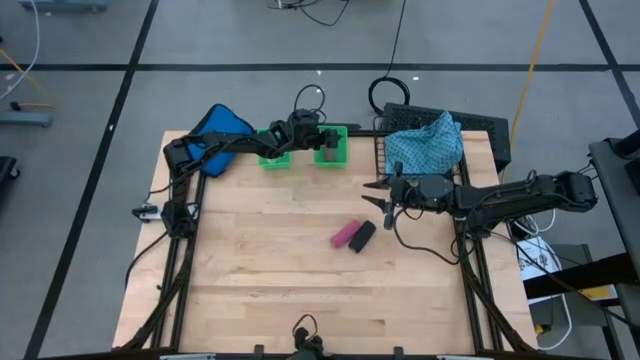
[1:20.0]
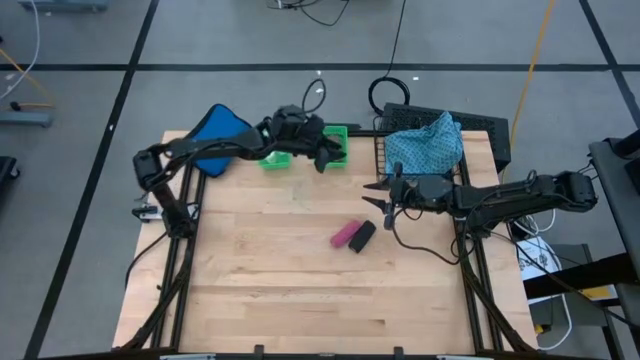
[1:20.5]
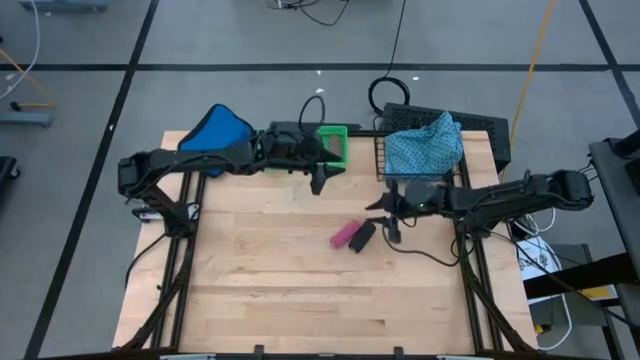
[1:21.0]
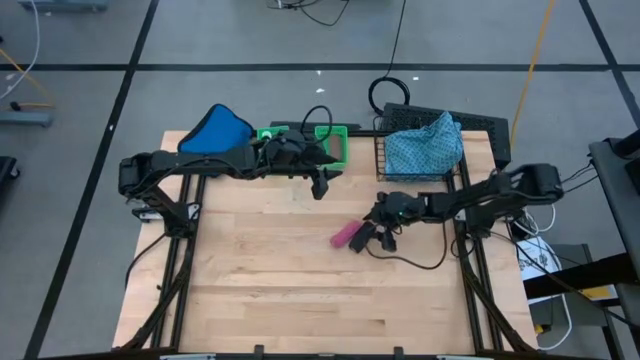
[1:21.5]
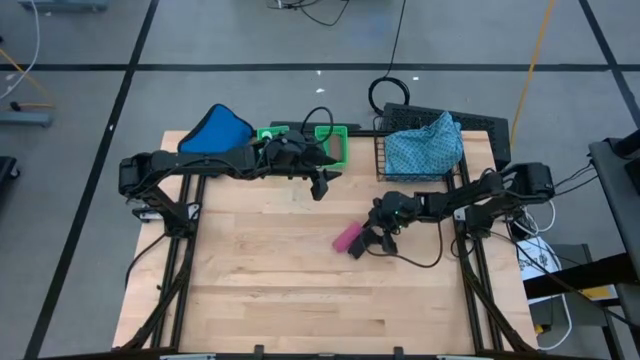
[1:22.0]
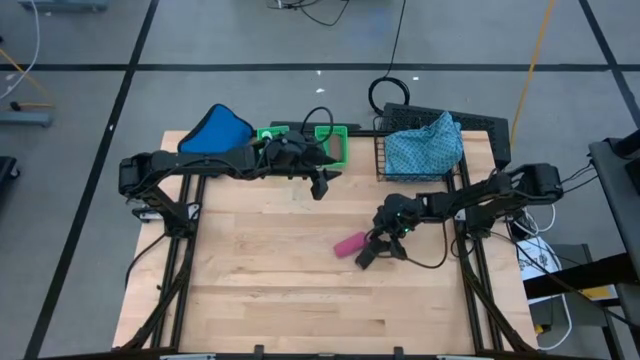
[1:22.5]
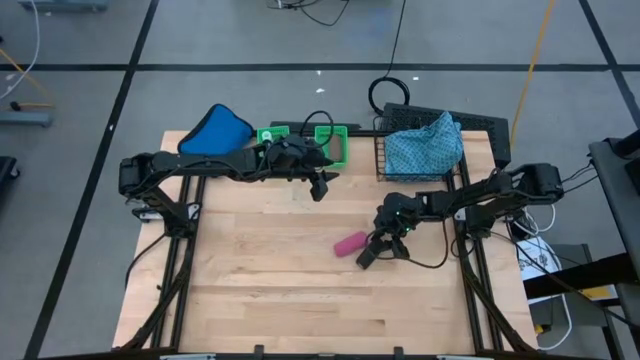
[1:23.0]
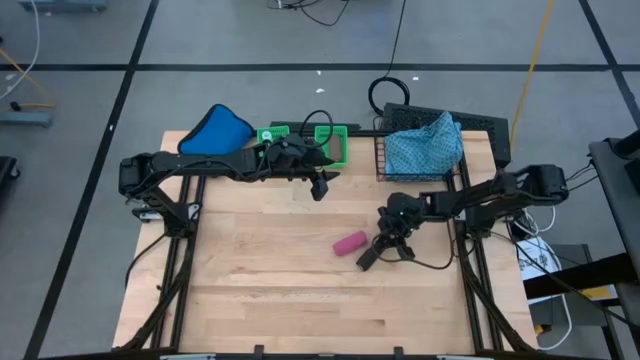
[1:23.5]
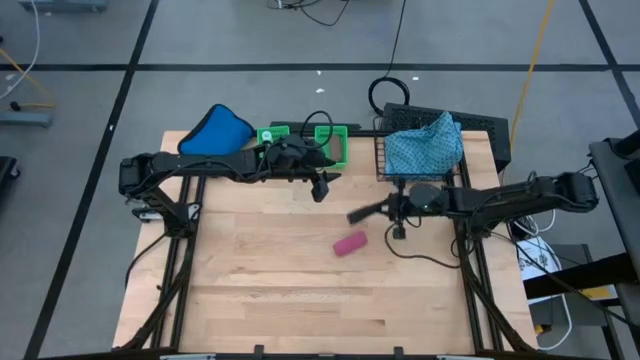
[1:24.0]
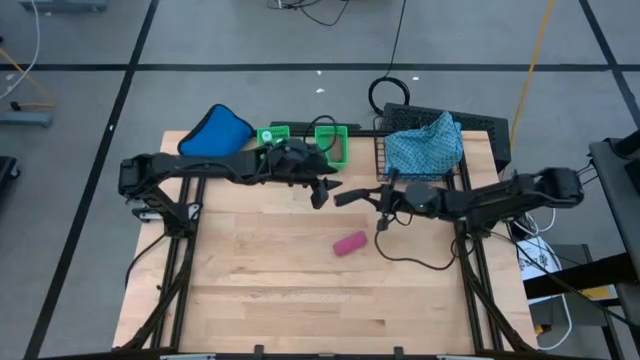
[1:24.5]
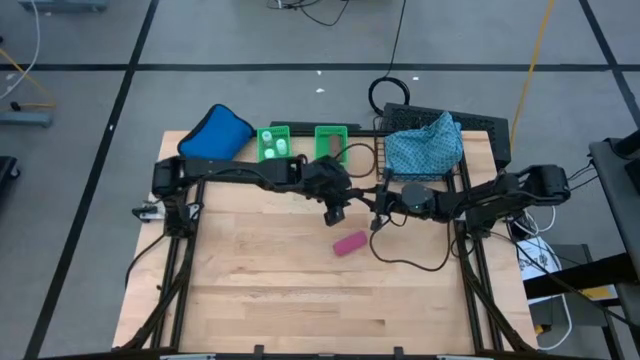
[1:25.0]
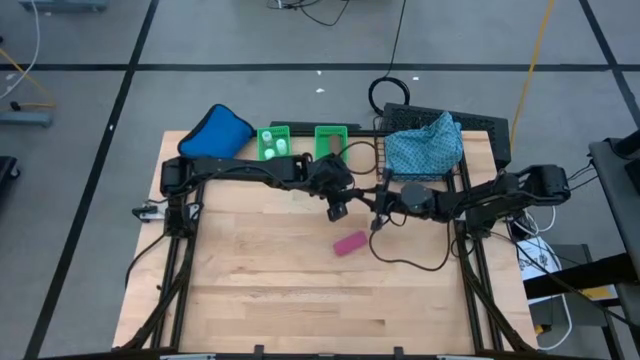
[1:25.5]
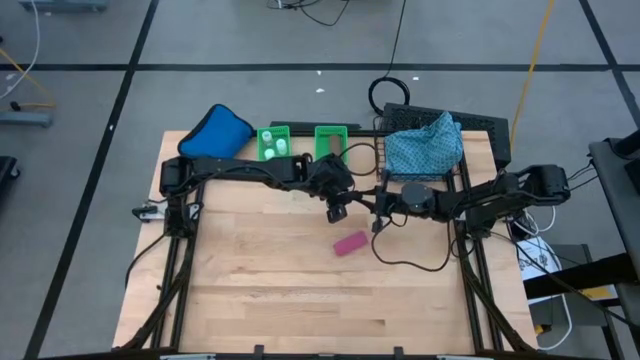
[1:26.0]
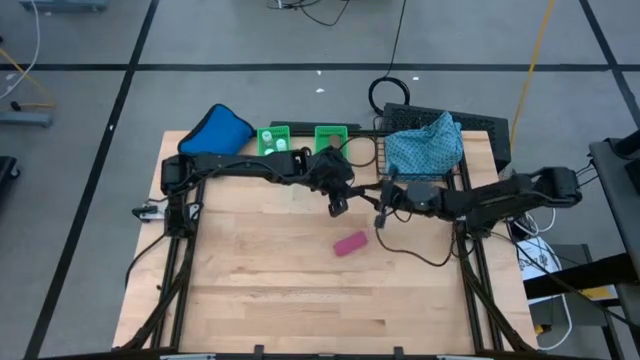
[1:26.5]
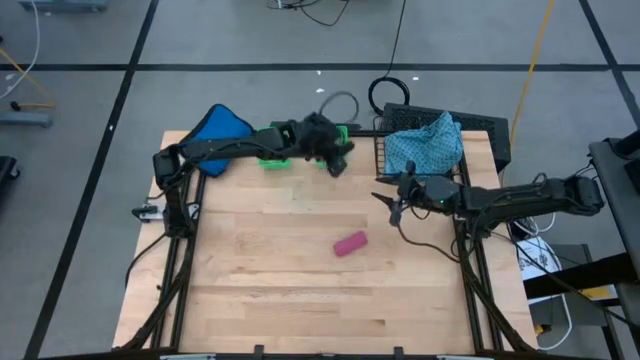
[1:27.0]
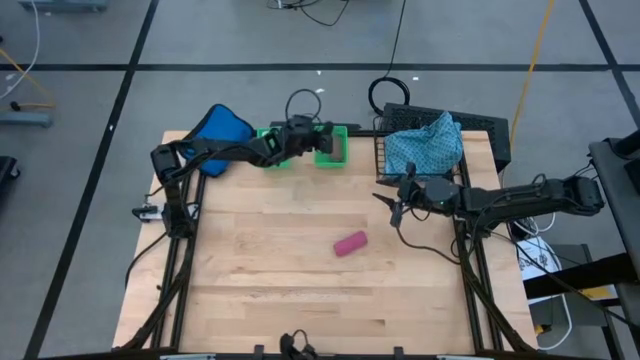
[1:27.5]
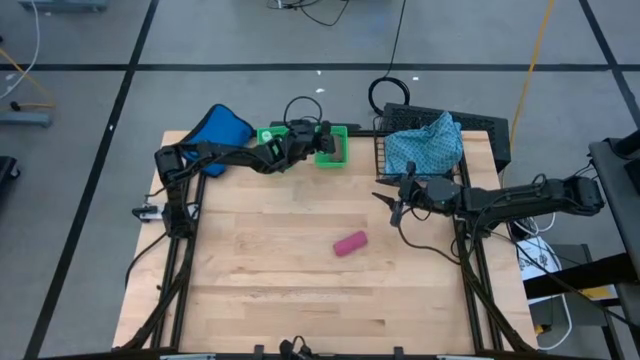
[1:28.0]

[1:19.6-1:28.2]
Task: Pick & place medical supplies in basket/bin
Put the black bandage into the right green bin

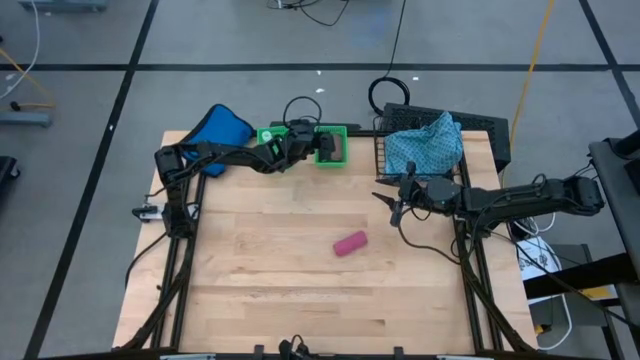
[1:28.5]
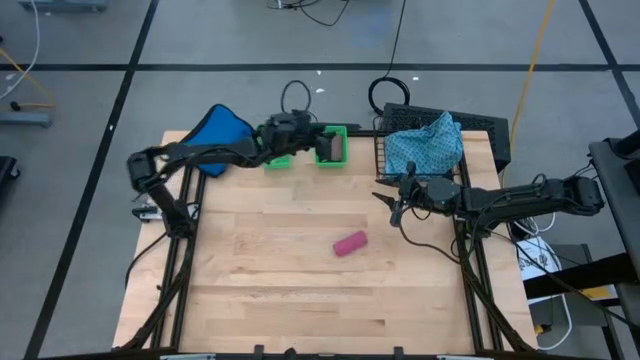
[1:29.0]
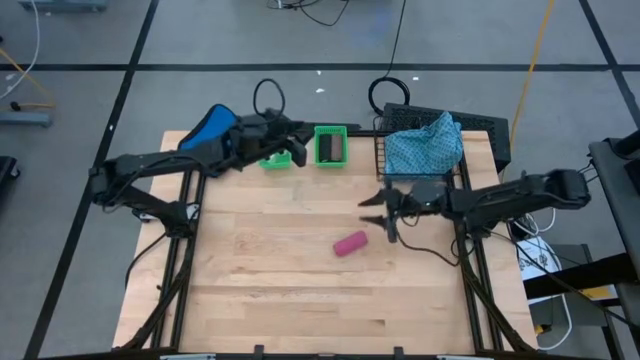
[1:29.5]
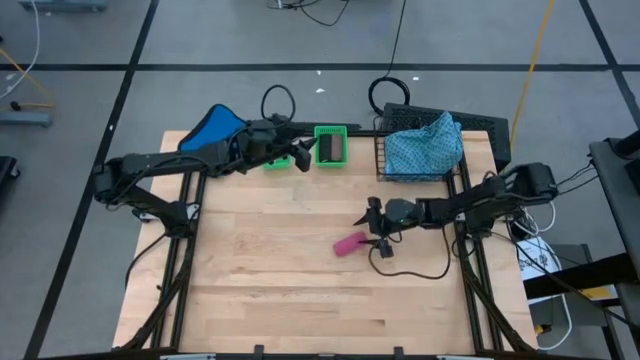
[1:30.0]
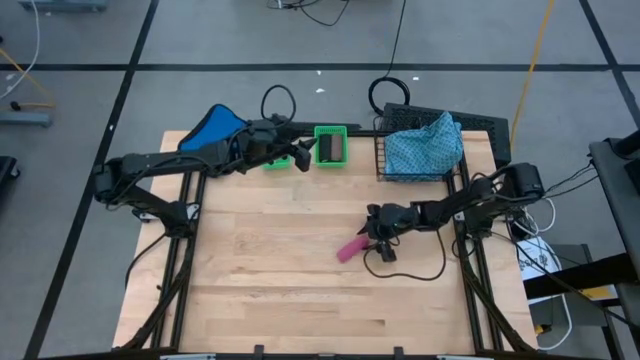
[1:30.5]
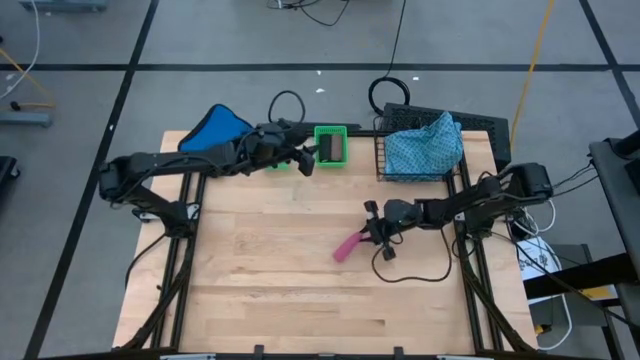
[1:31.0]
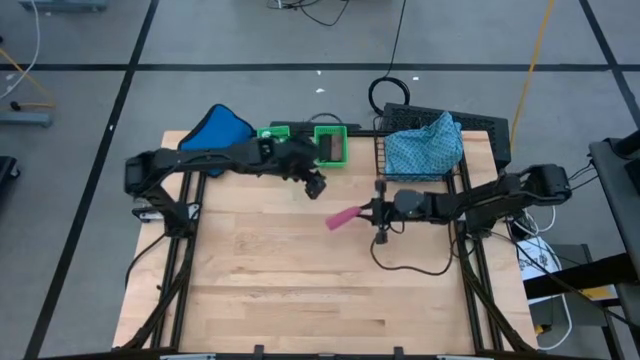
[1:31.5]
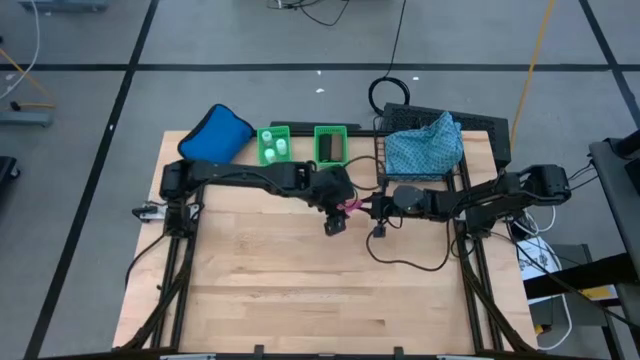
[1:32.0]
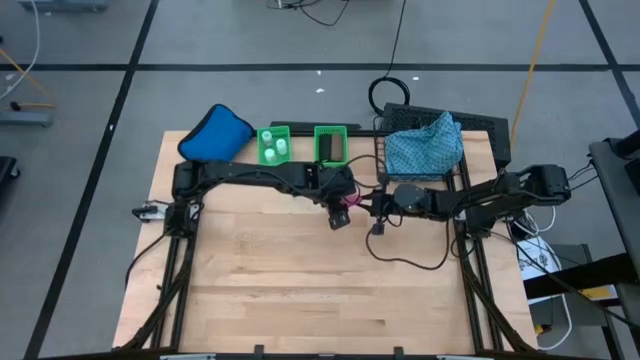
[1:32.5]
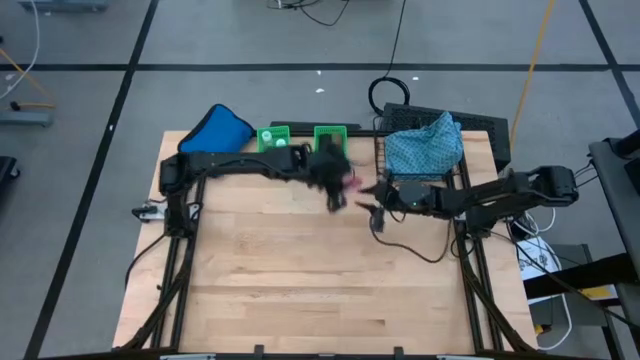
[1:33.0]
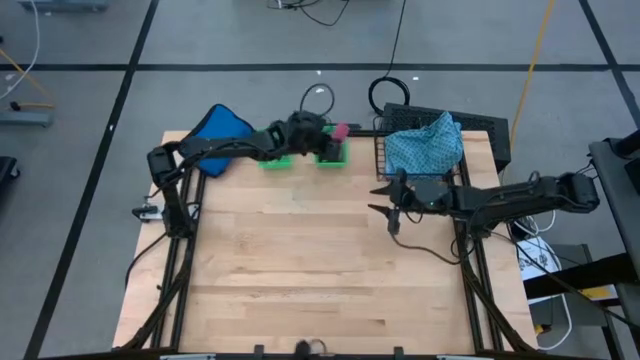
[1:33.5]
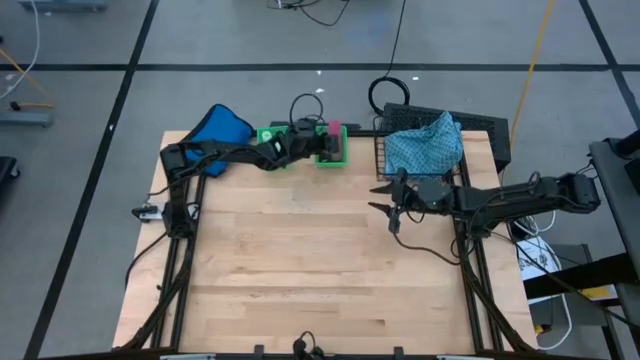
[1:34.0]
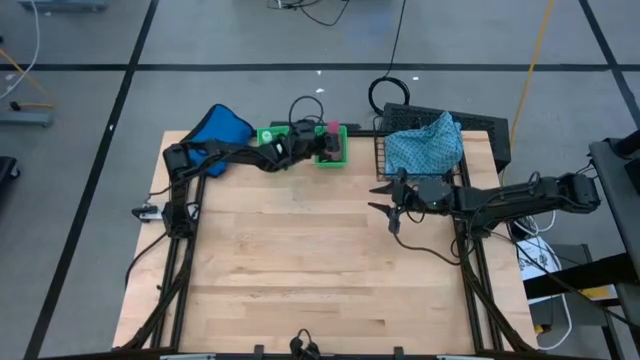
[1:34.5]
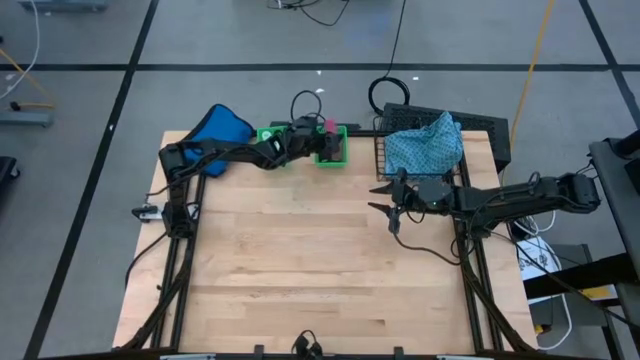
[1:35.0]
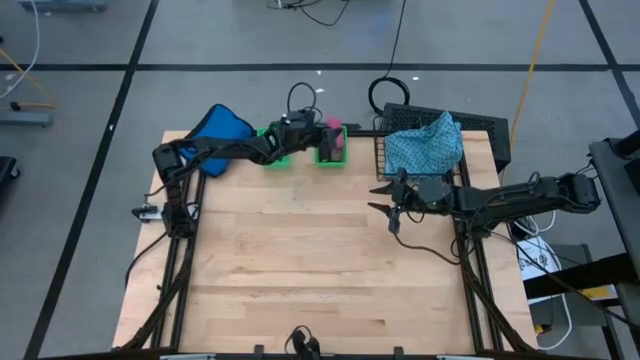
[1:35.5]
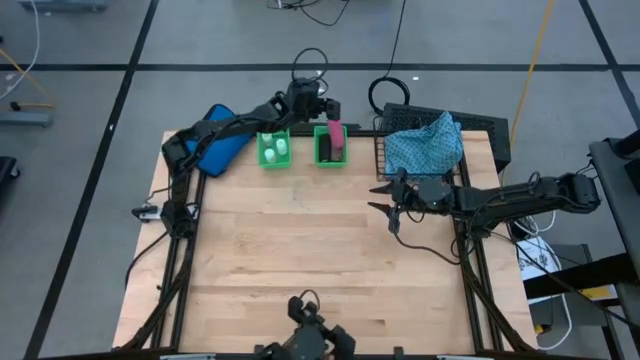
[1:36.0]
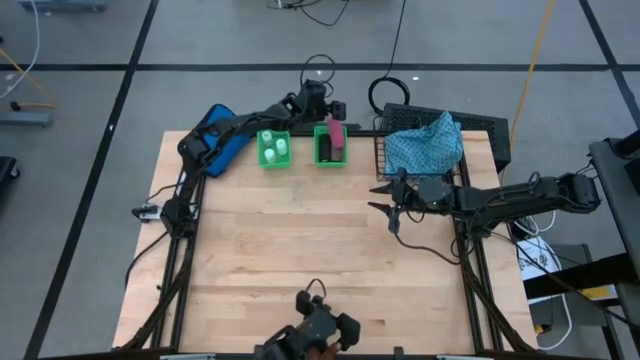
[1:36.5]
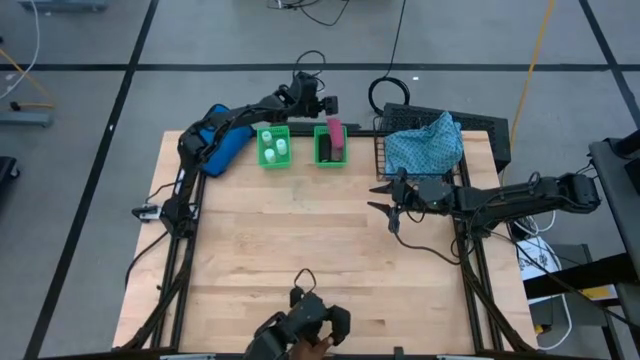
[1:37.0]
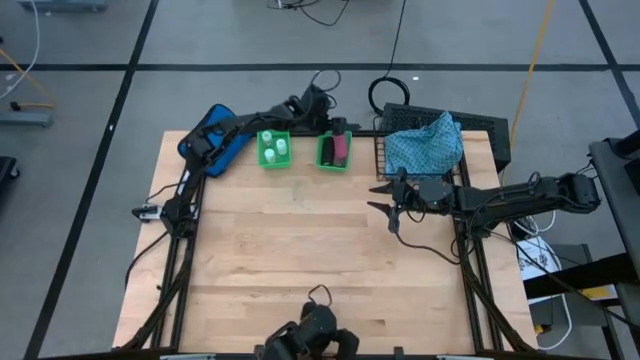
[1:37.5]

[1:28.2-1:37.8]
Put the pink bandage into the right green bin

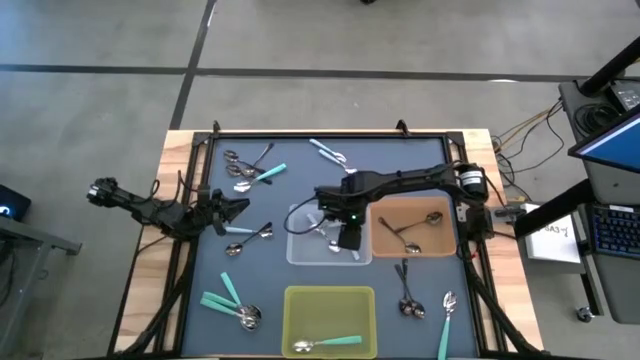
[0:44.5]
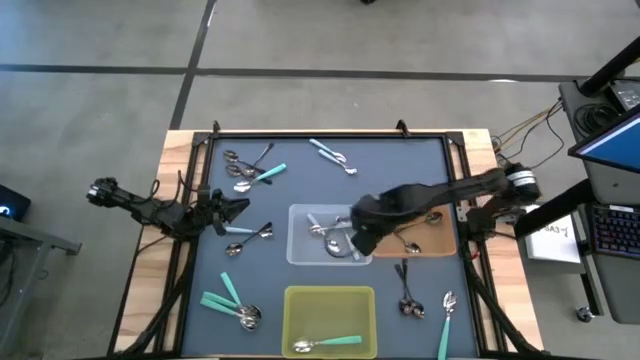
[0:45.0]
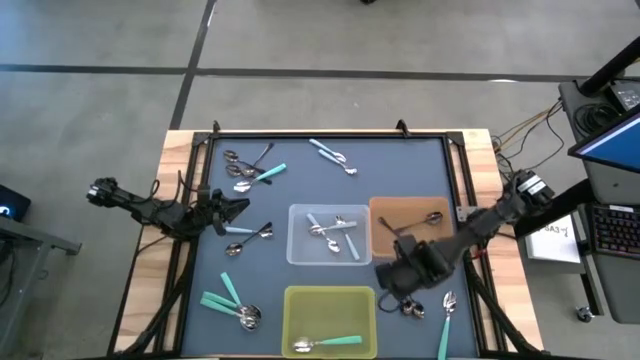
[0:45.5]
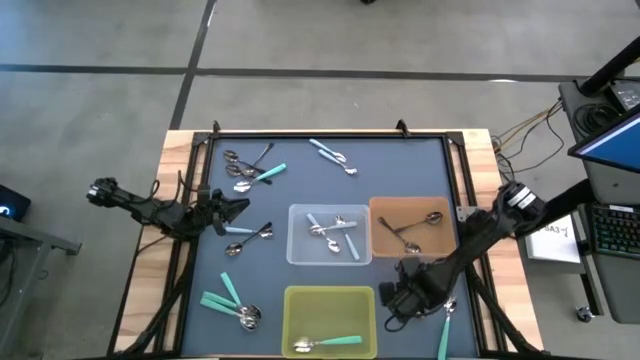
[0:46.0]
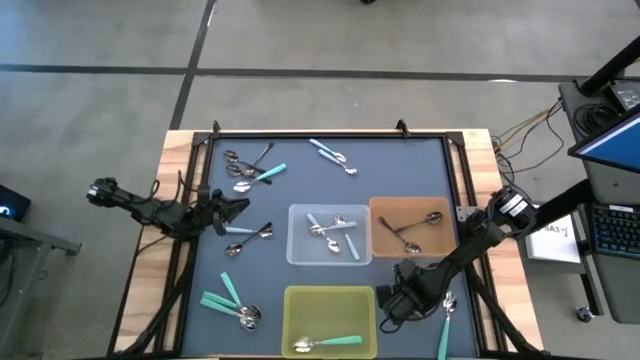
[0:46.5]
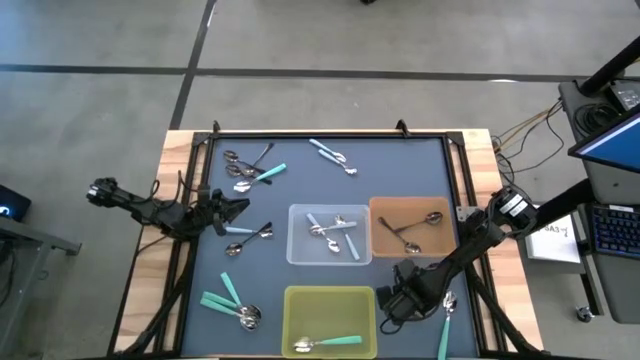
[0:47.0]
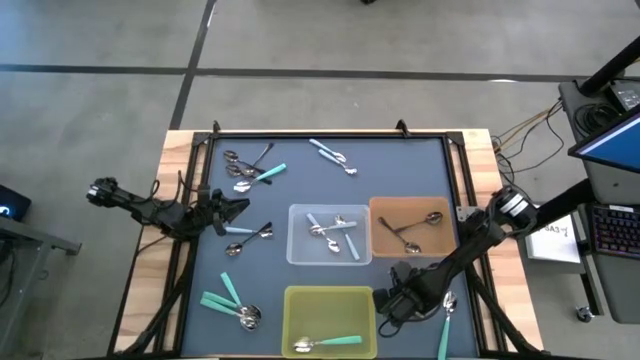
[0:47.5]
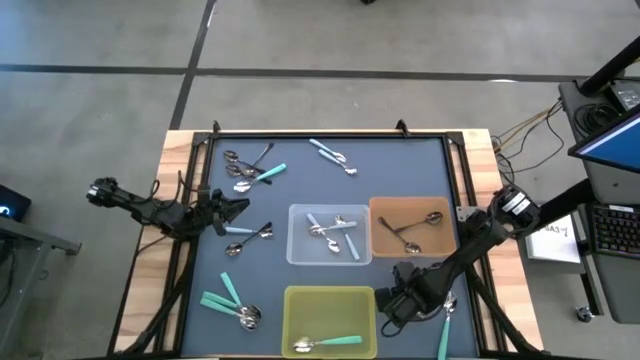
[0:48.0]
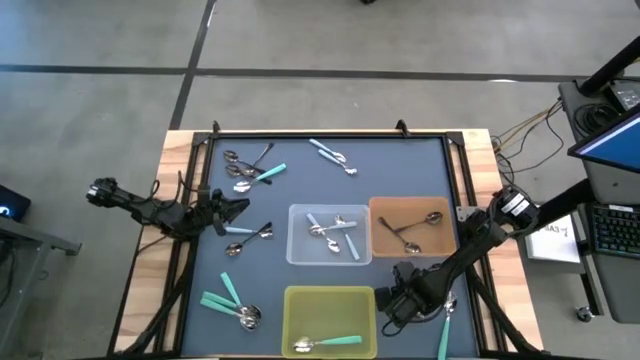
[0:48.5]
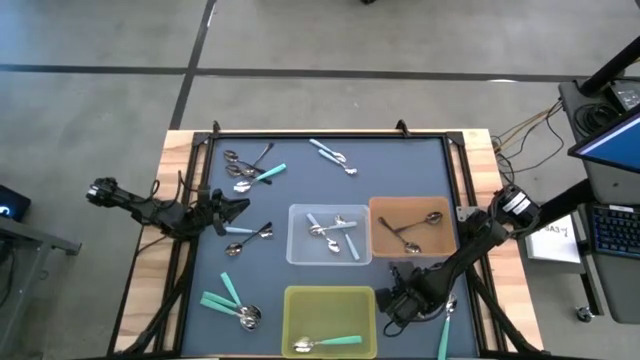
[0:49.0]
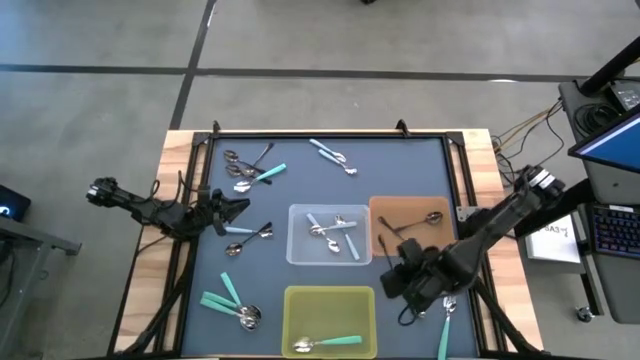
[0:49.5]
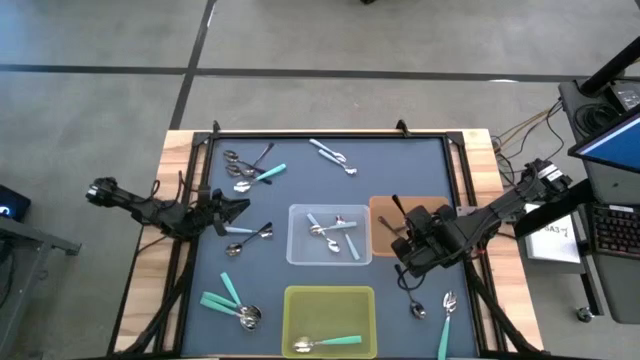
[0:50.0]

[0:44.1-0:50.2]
Task: Sort silverware by color (type)
Put the black spoon into the orange bin
